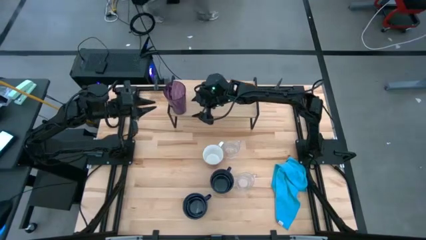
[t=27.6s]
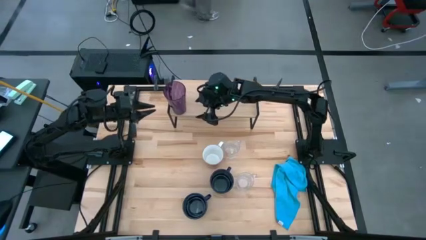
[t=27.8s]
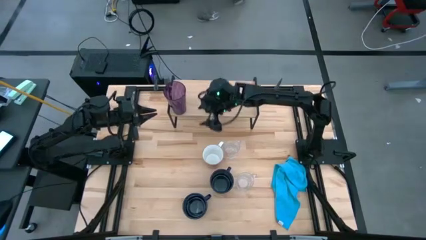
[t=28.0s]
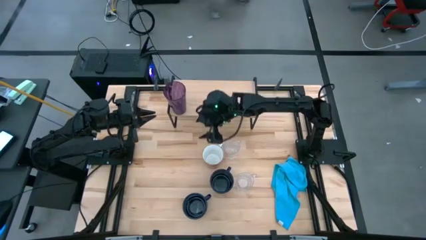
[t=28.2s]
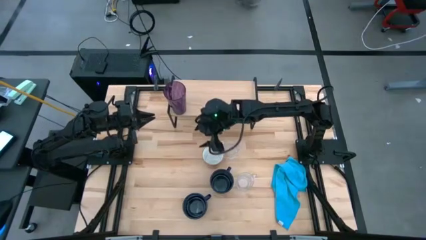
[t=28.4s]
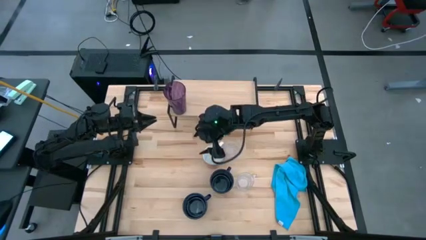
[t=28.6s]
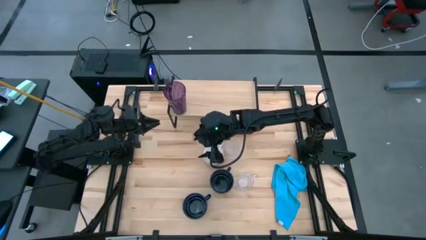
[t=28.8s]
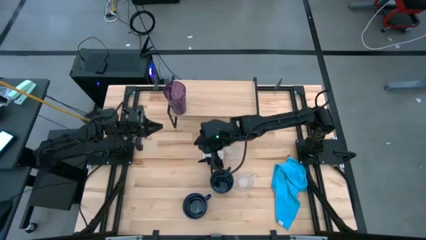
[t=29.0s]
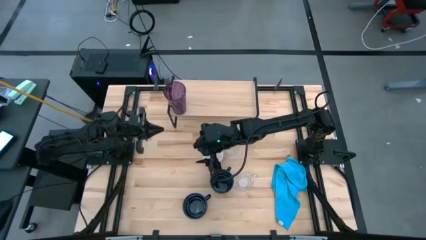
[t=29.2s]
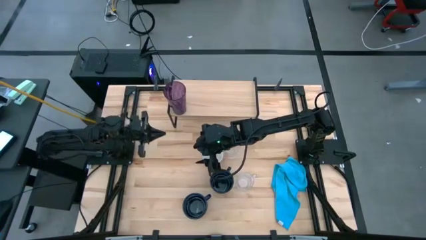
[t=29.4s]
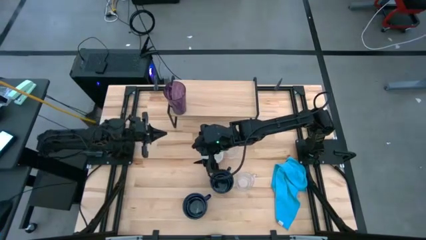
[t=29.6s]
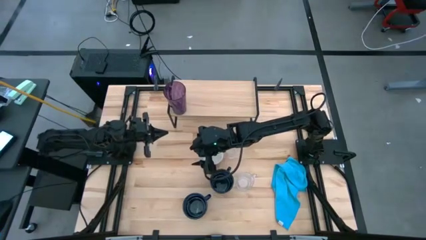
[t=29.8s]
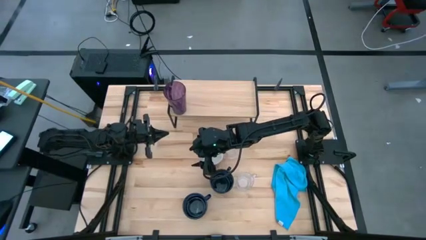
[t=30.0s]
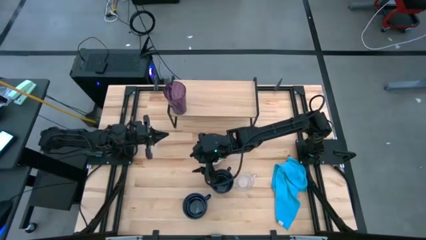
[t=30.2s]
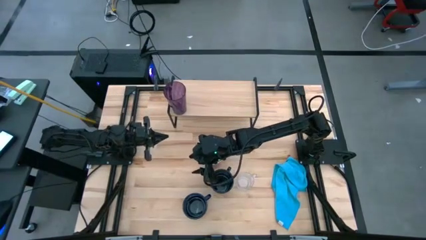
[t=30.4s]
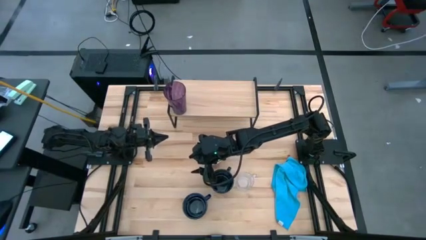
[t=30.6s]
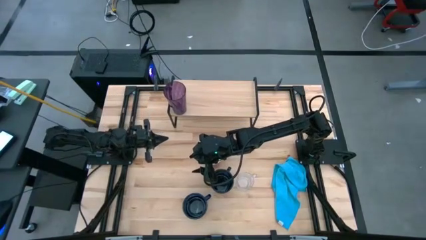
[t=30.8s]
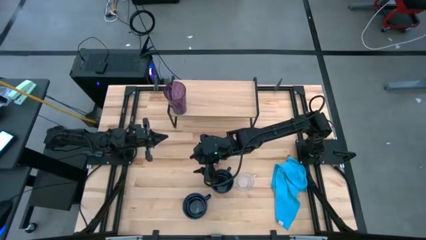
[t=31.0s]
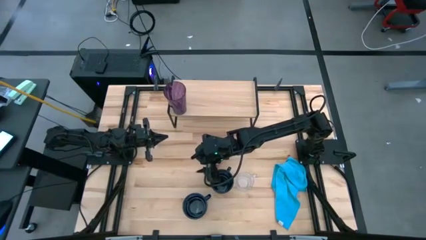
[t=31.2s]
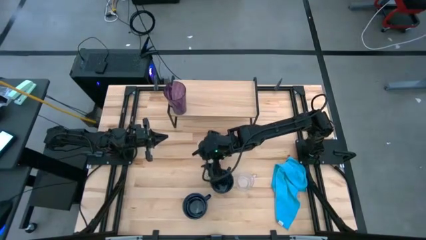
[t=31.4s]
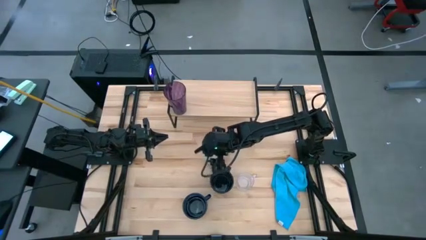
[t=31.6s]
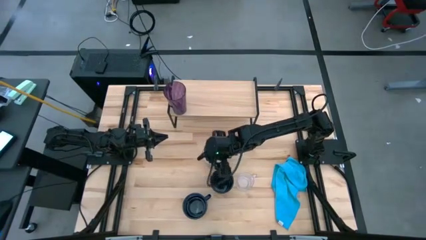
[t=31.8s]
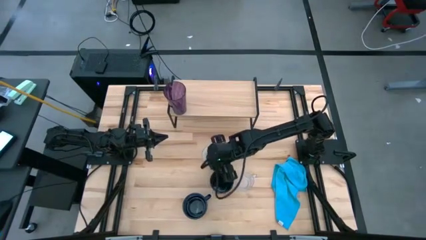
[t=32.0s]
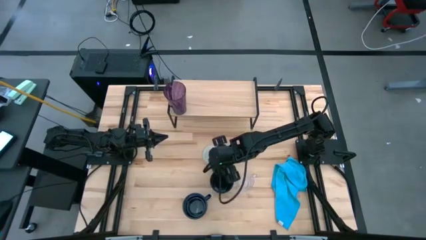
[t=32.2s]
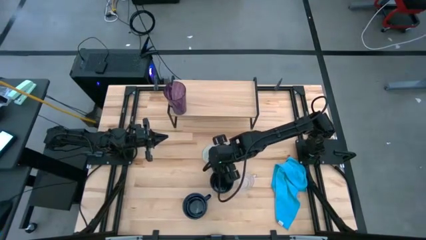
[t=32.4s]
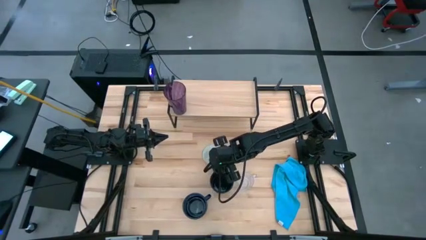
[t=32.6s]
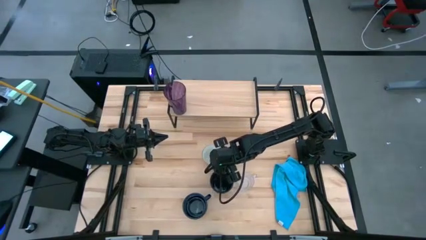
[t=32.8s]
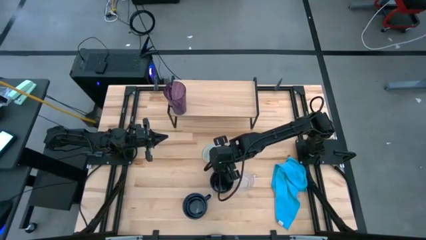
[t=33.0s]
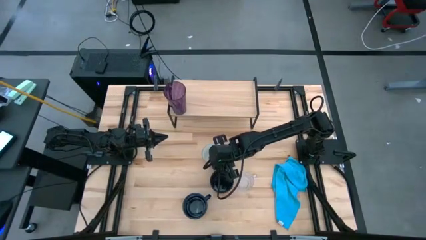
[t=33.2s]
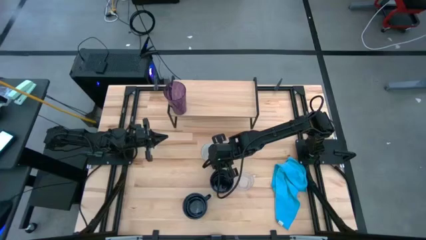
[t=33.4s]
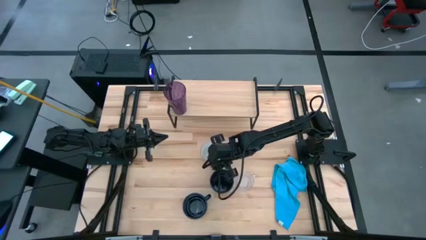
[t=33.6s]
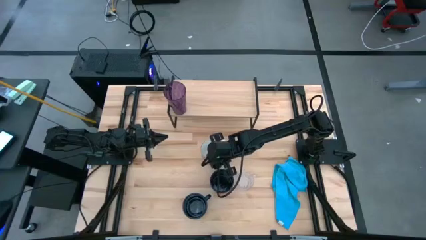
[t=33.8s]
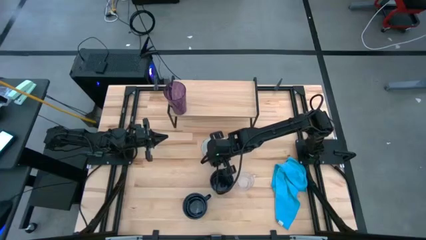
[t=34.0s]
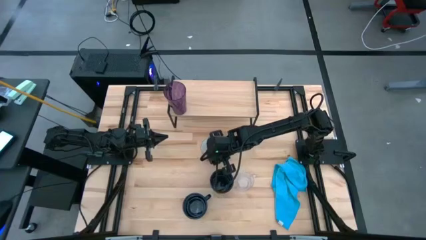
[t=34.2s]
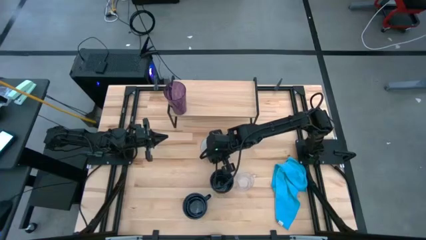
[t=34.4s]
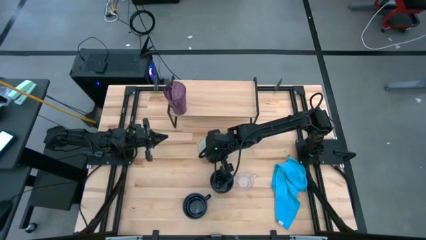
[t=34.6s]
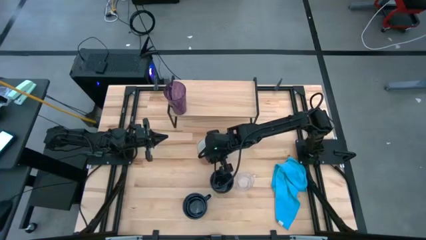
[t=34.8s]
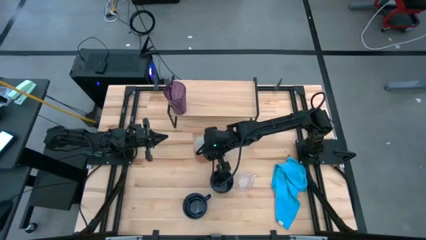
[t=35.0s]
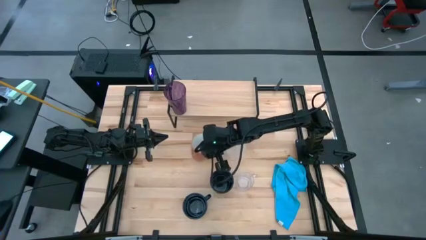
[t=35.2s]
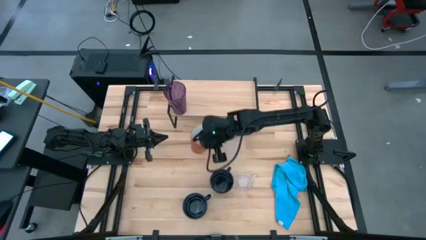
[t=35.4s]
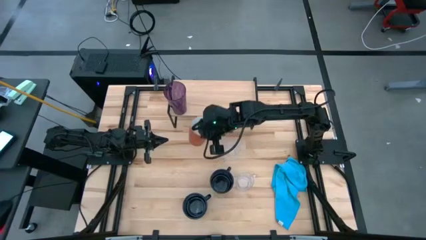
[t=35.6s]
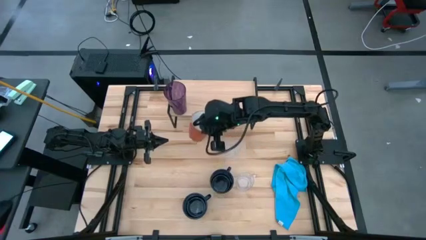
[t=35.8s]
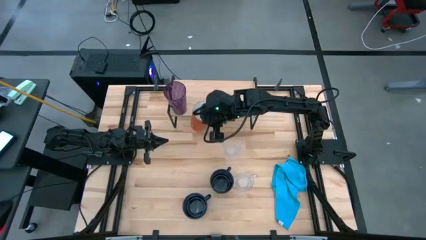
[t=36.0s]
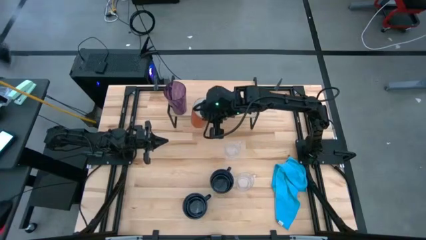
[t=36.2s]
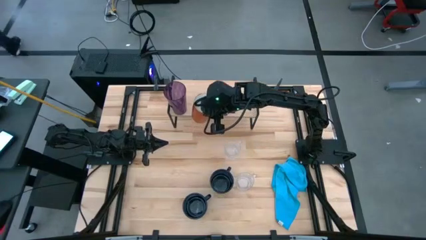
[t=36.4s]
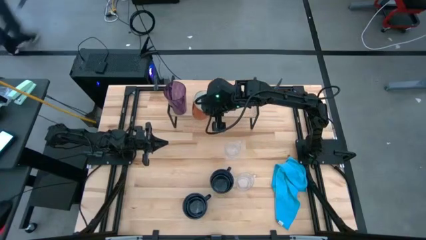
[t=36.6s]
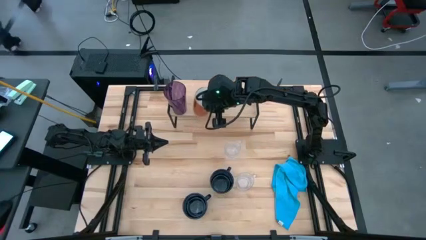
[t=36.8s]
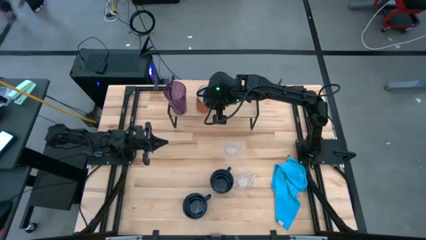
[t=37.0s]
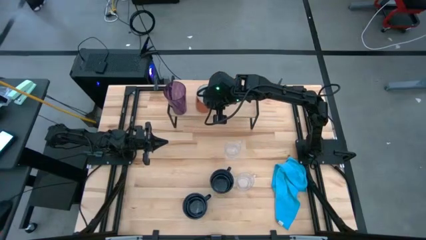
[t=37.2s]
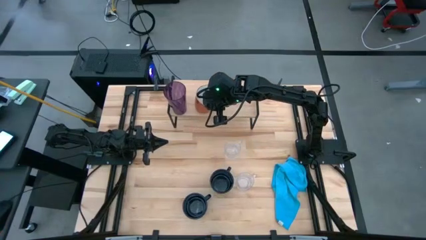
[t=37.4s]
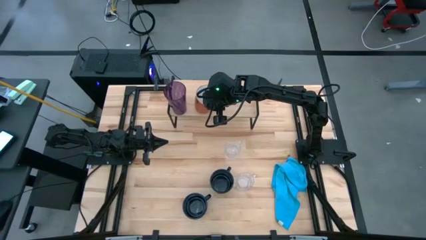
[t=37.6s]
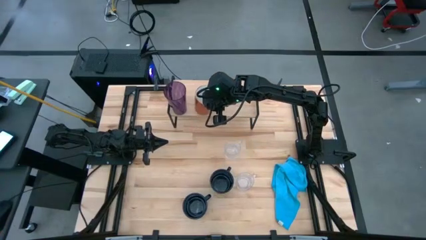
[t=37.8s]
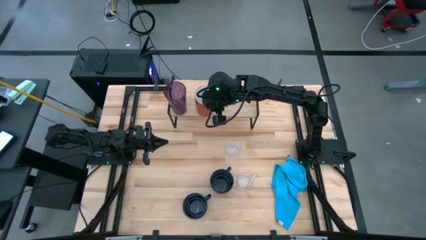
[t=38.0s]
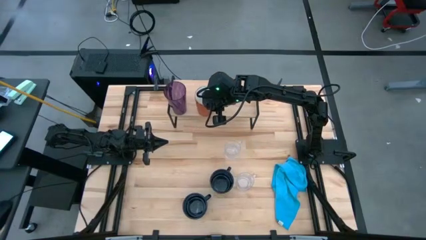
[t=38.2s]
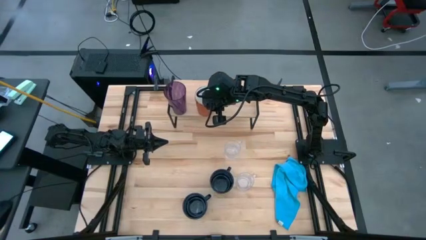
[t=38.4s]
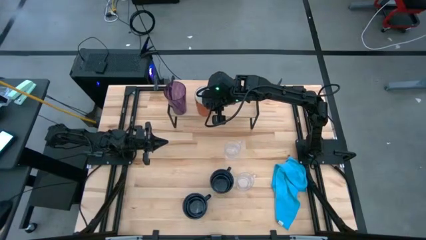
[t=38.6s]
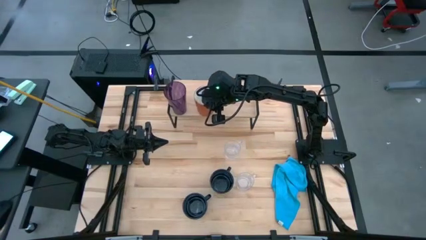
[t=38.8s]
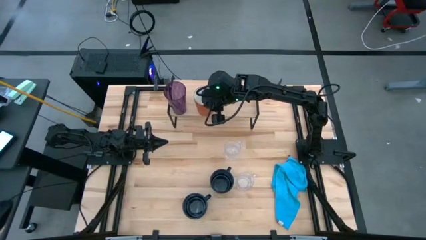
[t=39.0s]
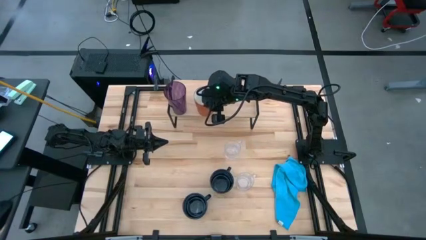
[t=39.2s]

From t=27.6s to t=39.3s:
Task: Stack small to large cups/mugs on shelf
Put the brown mug on the shelf

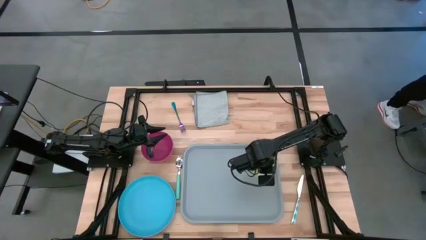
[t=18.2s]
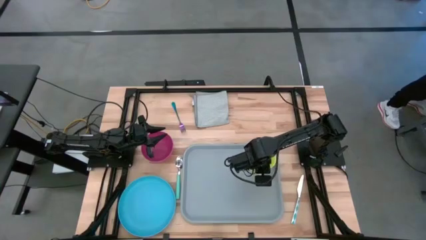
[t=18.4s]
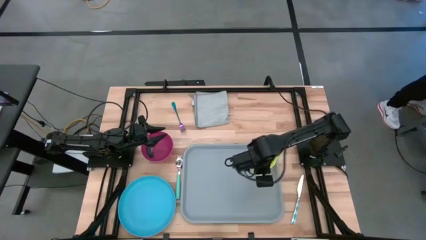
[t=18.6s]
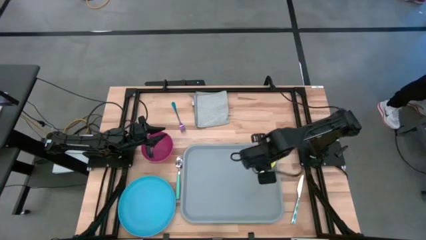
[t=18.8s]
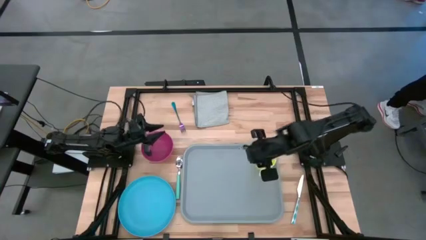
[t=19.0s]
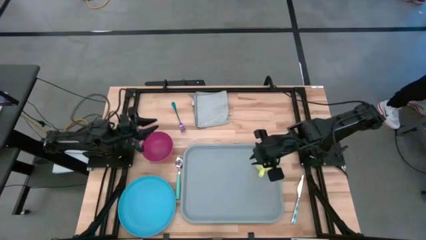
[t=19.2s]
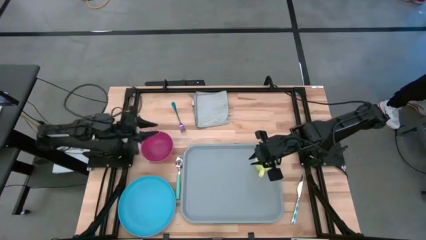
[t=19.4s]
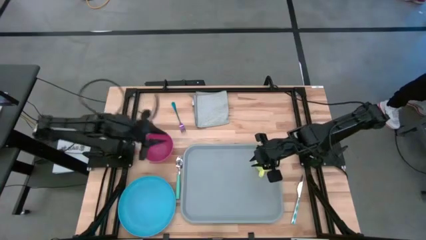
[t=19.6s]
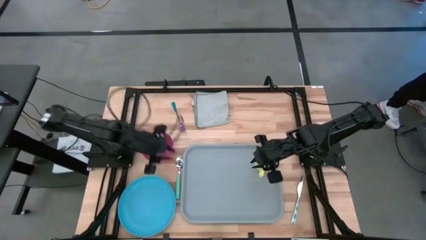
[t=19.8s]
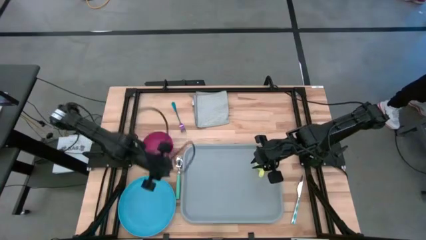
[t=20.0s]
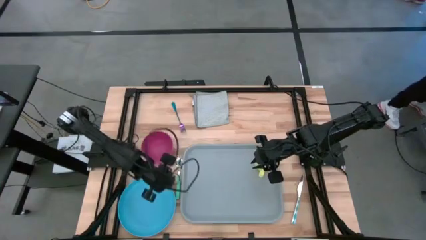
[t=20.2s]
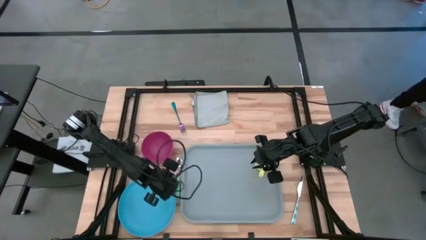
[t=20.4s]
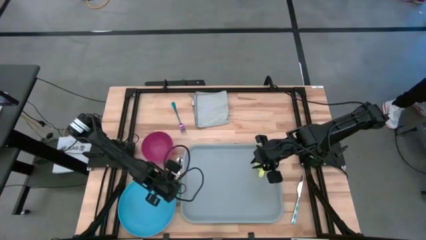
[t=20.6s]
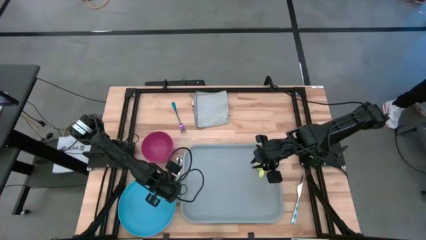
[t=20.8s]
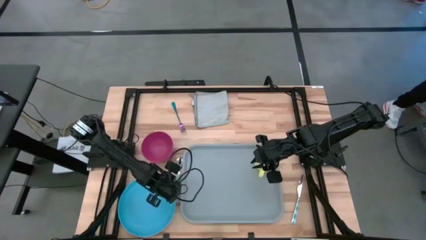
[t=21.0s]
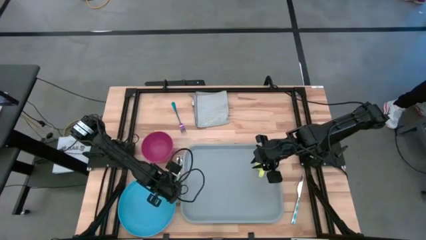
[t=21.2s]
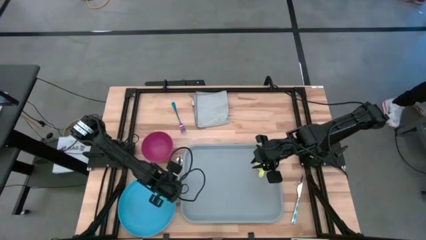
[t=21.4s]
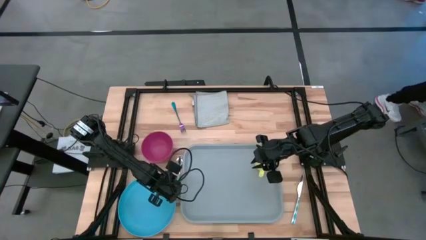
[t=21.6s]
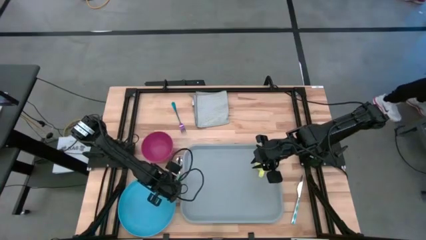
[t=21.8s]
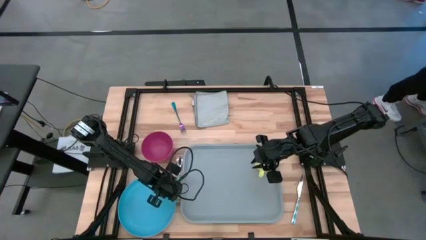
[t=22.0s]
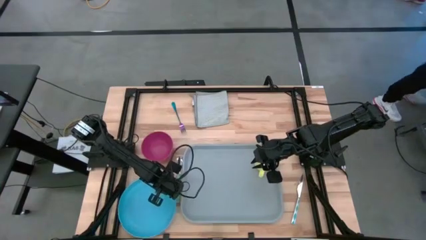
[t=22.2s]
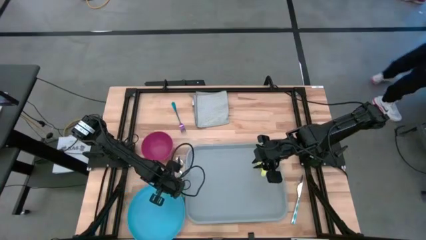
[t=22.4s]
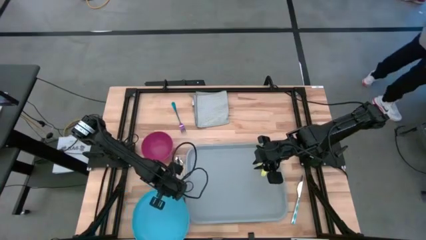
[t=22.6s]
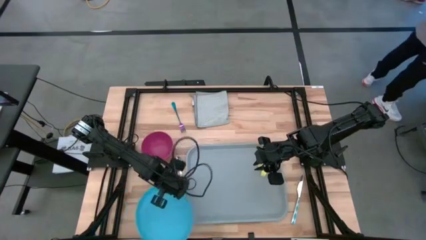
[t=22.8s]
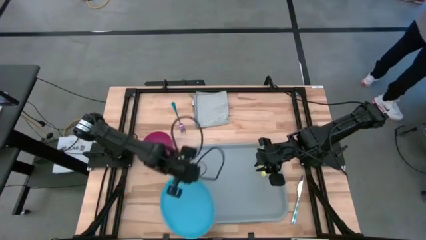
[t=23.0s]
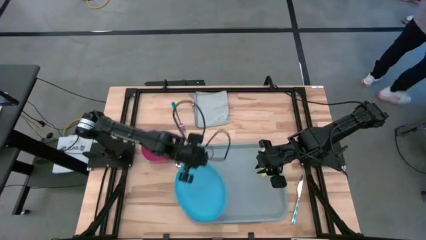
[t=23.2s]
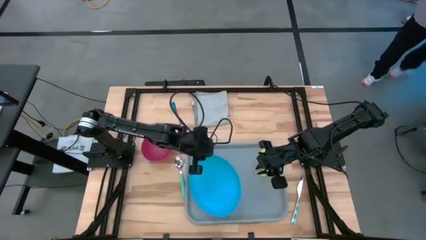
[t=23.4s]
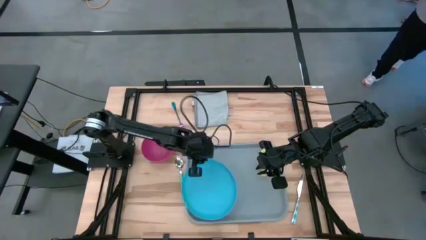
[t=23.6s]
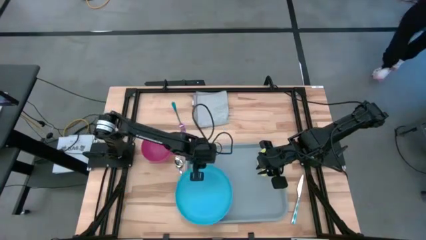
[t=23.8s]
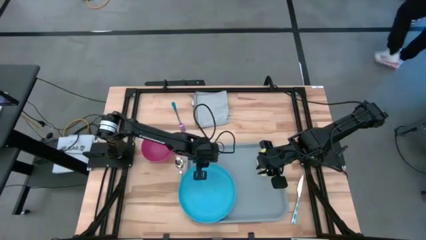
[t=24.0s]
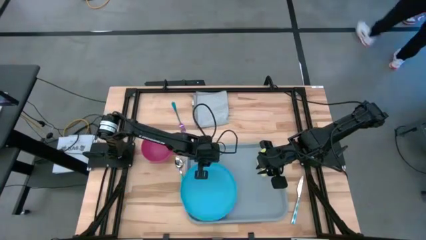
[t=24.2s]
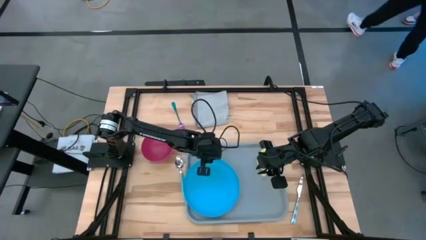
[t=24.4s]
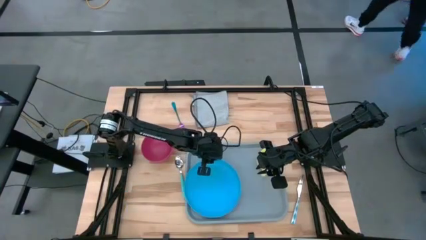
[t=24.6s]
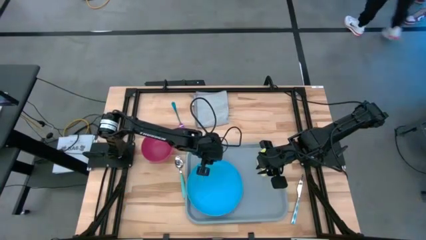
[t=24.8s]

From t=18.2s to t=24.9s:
Task: Set up tray
Put the blue plate on the gray tray
